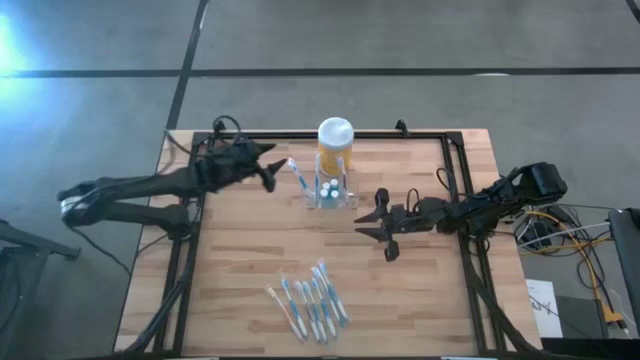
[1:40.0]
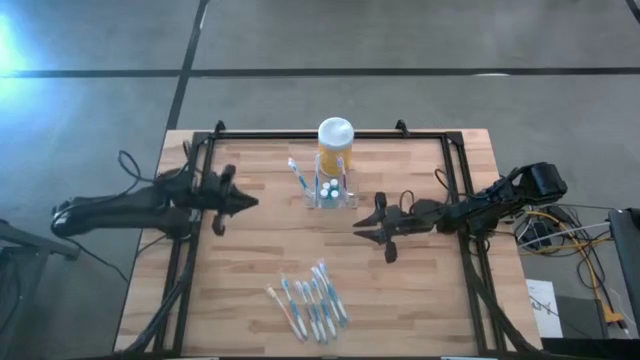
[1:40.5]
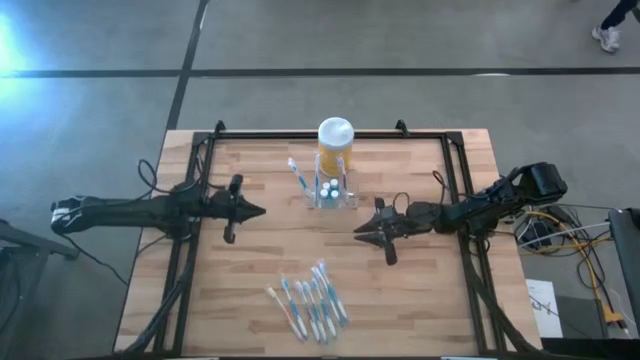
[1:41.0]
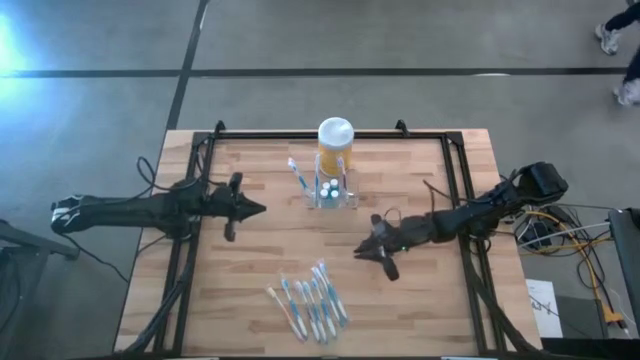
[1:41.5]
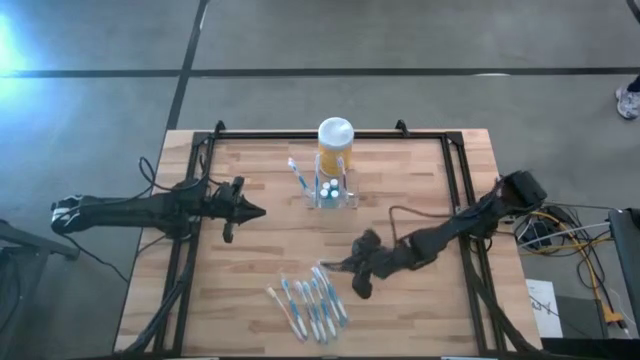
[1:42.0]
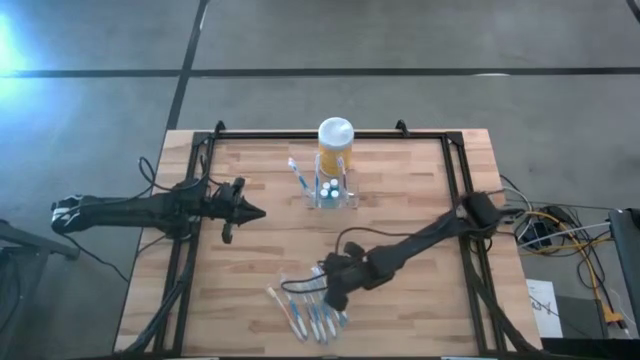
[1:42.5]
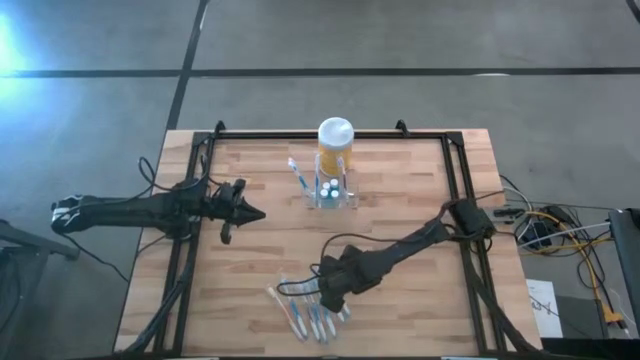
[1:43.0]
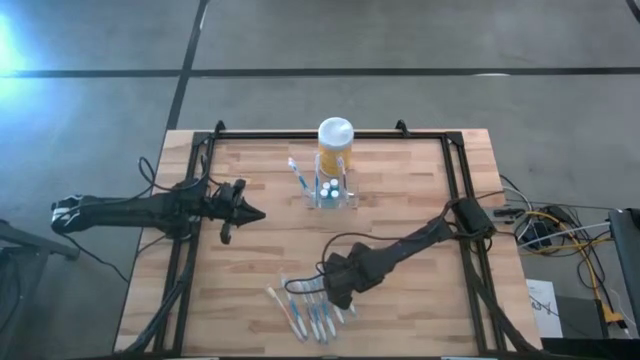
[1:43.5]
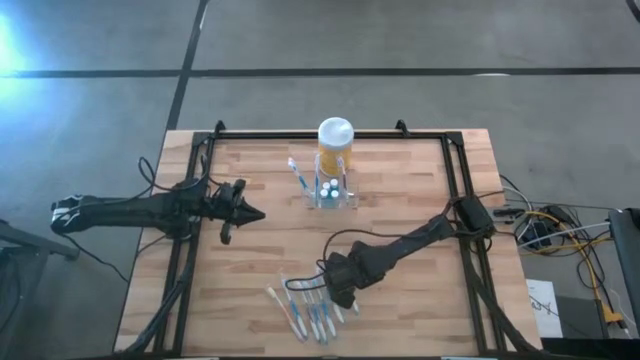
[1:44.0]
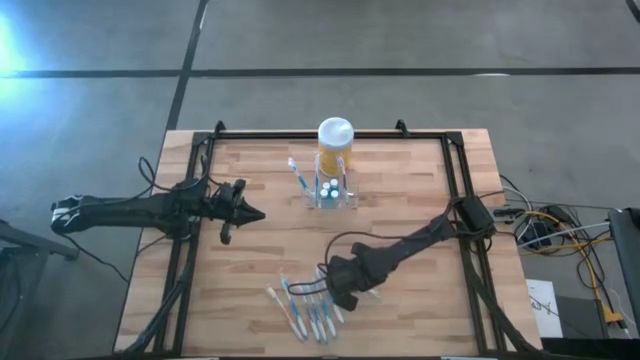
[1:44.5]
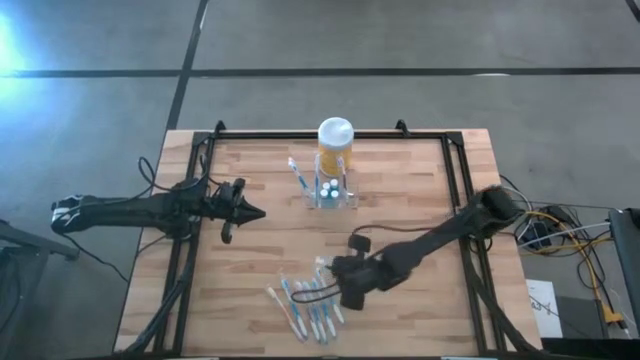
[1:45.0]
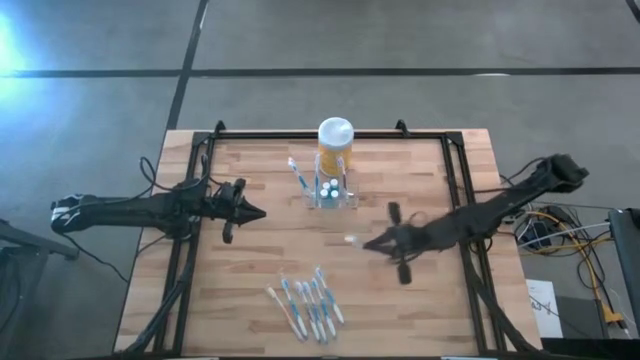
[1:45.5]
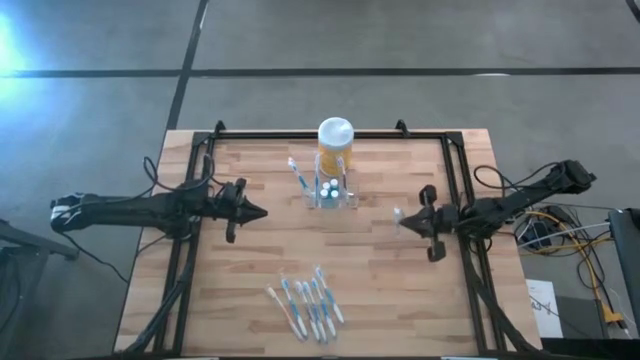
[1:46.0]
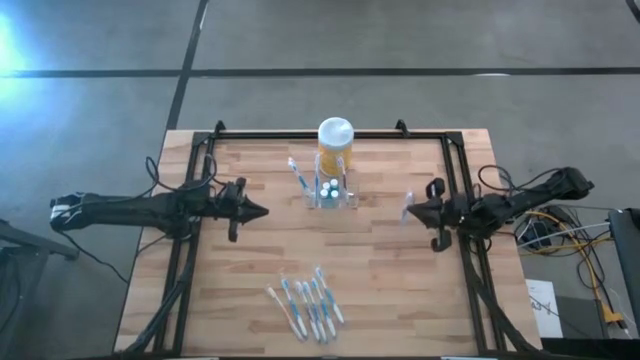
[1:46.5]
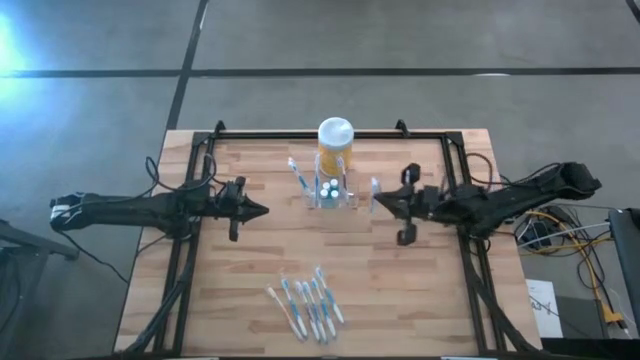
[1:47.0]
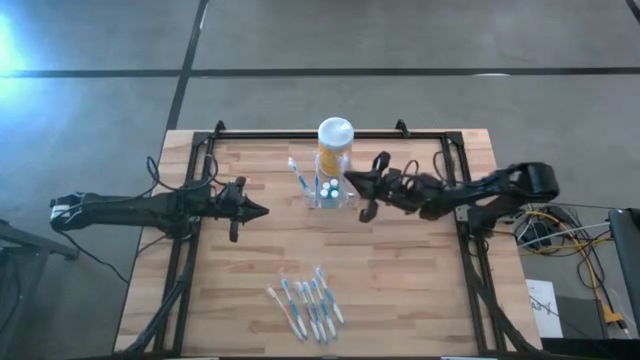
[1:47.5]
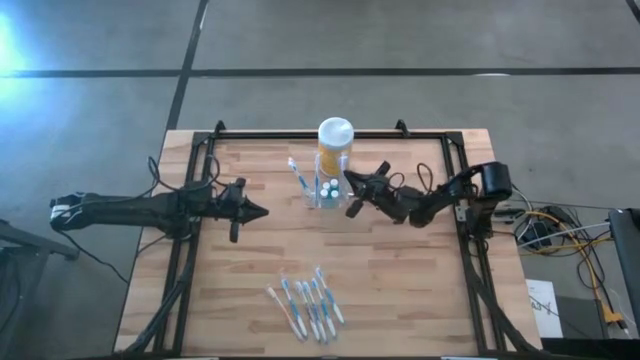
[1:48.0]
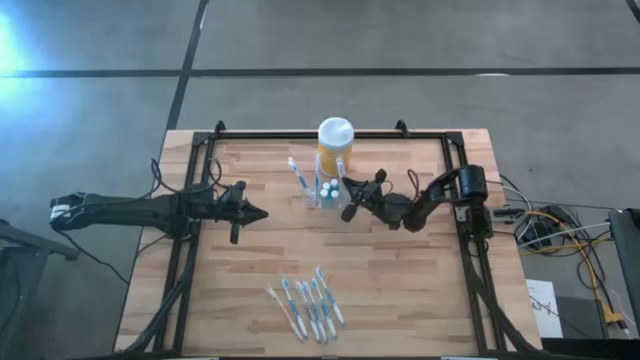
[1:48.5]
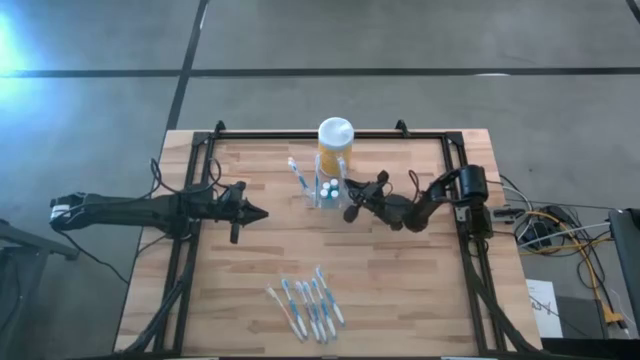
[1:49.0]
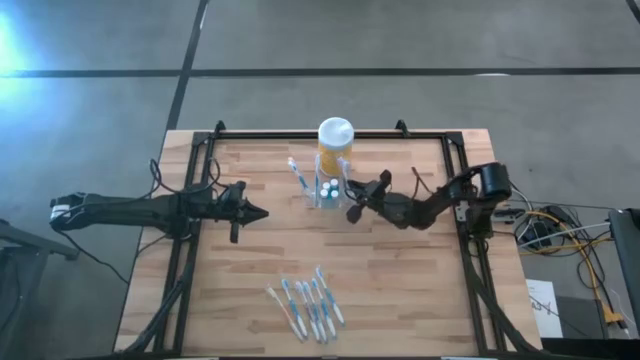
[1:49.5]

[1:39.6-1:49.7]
Task: Pick & Place toothbrushing station
Put the blue toothbrush into the transparent organizer

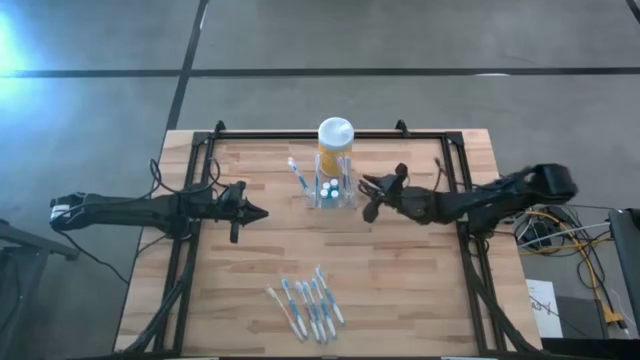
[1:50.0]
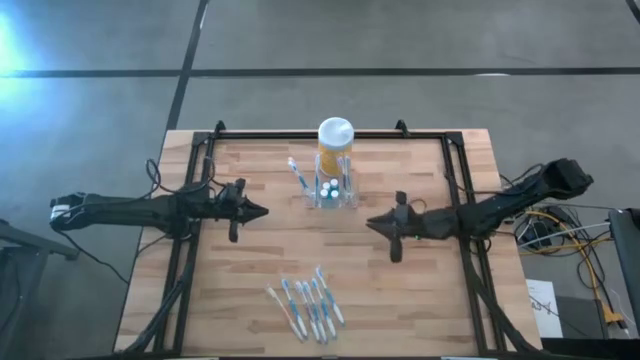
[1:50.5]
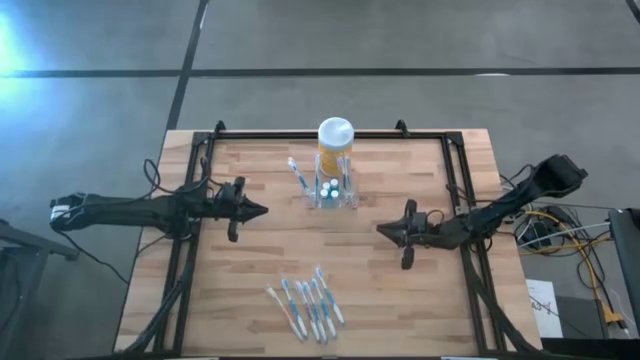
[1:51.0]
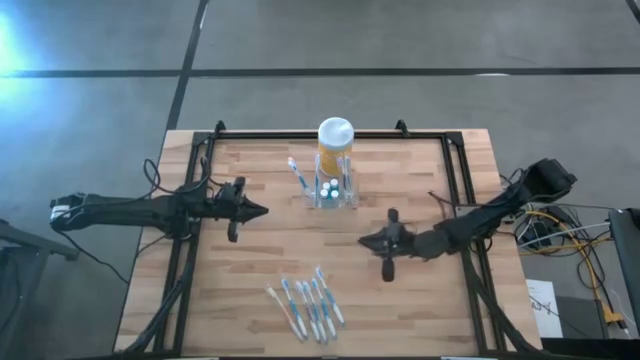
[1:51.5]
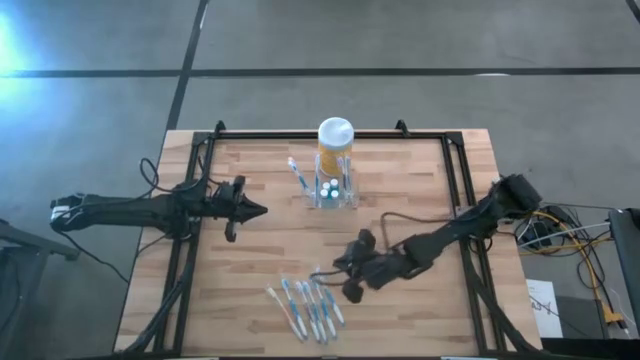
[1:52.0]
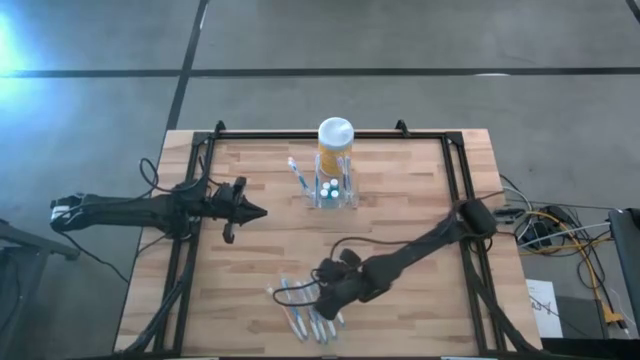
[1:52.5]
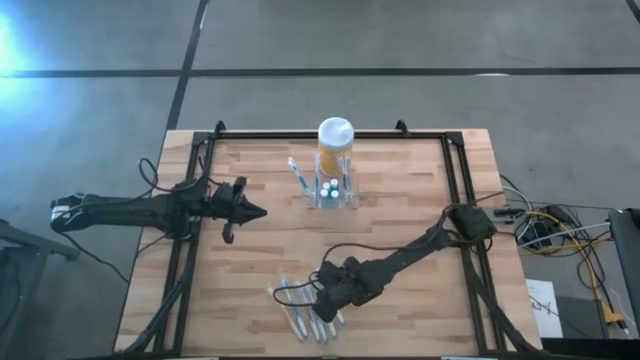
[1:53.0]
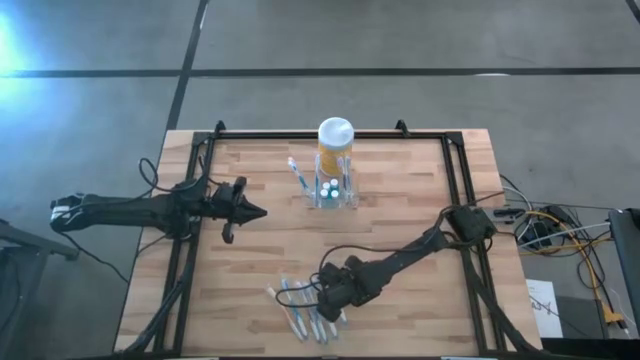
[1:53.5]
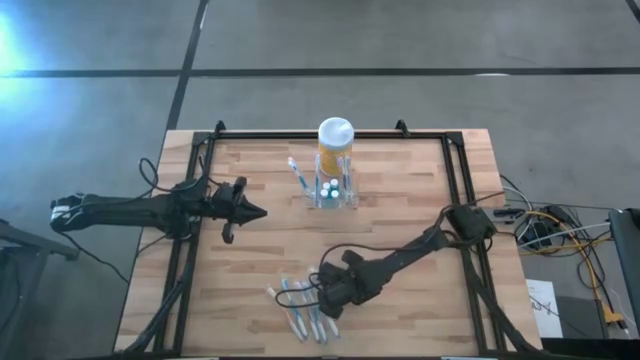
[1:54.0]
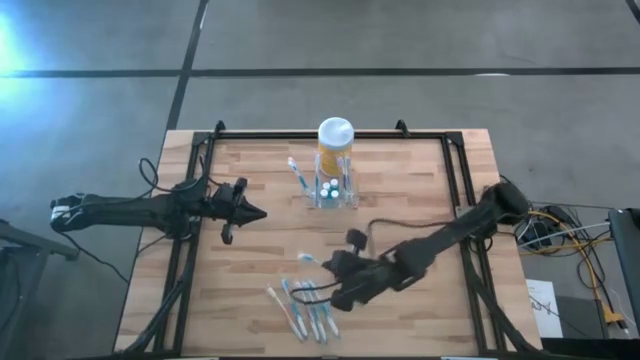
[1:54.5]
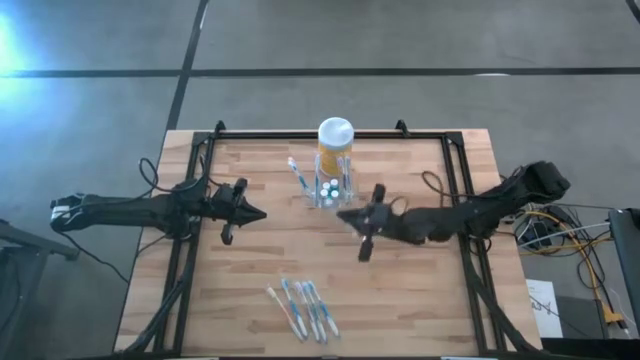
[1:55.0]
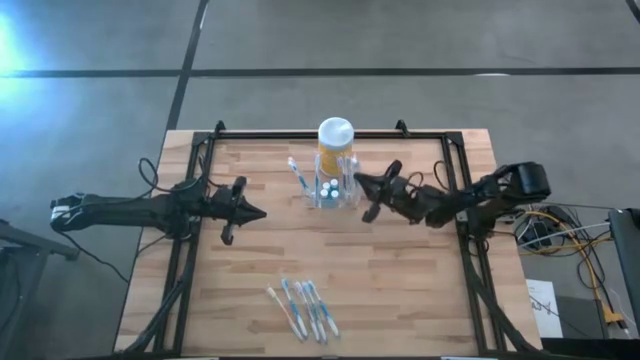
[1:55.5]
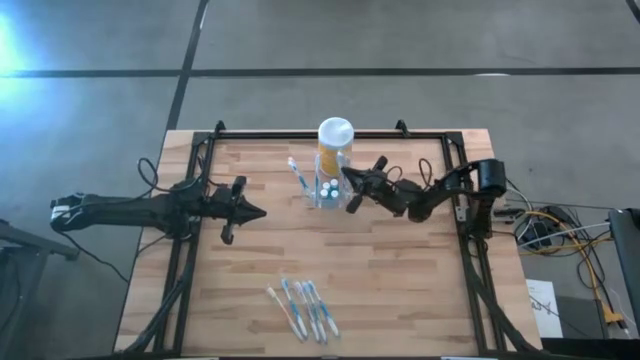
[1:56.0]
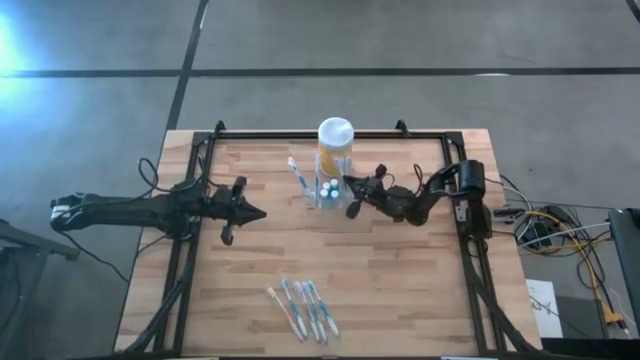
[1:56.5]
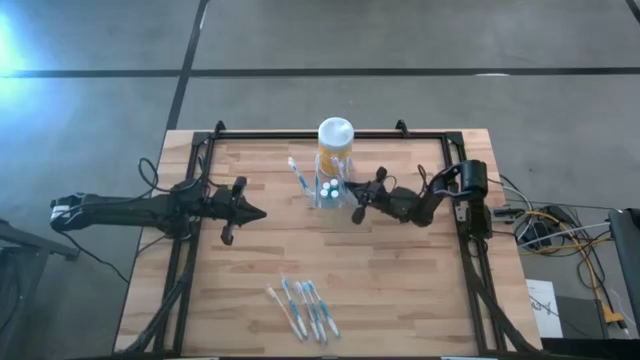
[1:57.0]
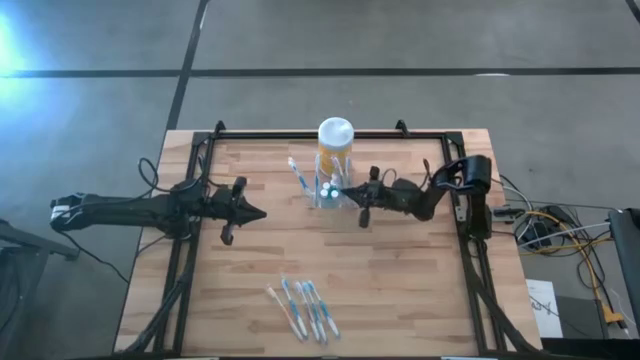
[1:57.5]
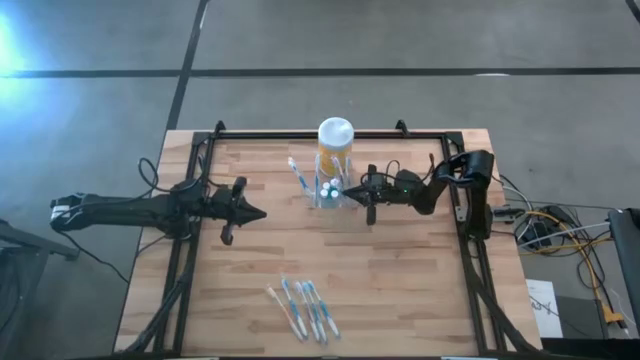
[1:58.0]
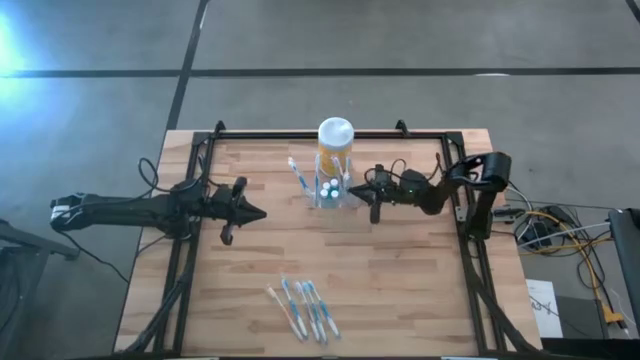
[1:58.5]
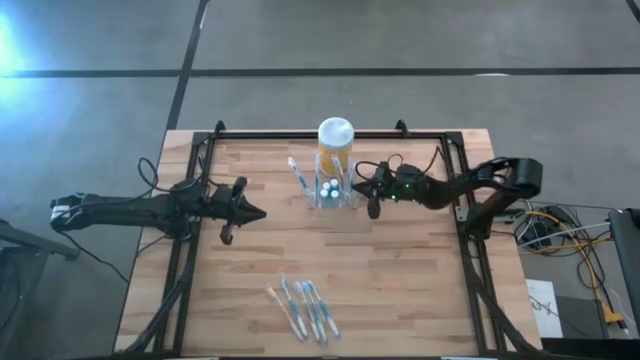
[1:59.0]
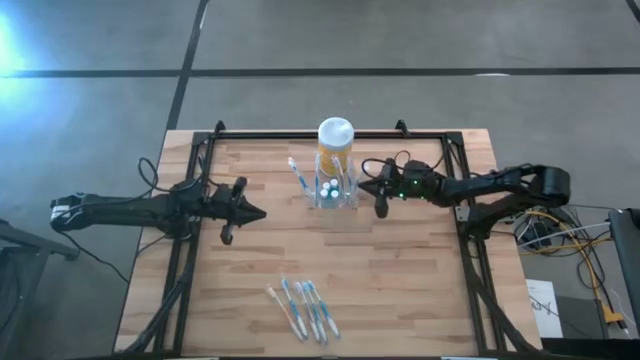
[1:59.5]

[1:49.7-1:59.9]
Put the blue toothbrush into the transparent organizer

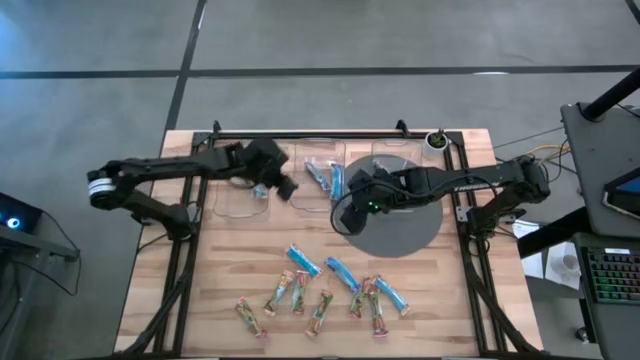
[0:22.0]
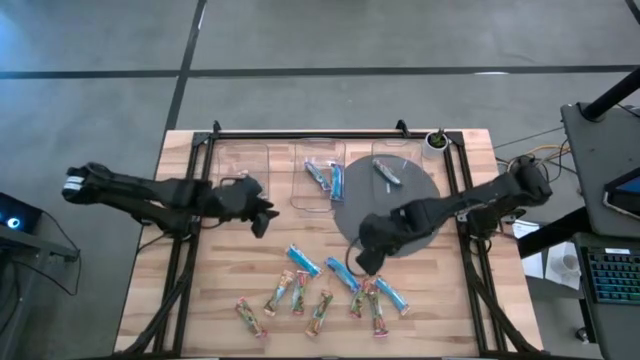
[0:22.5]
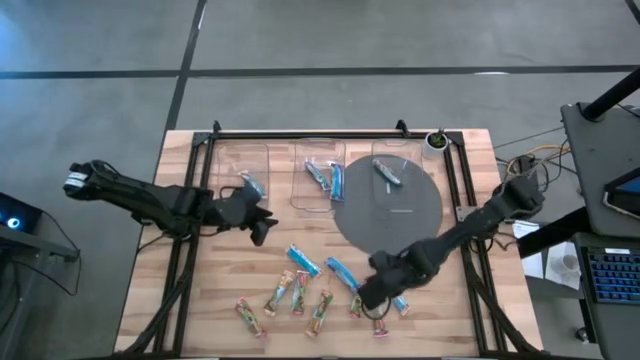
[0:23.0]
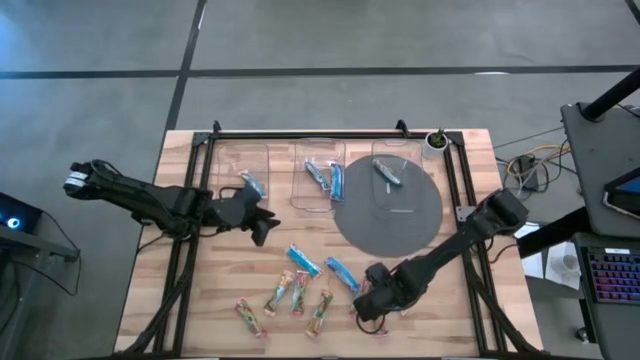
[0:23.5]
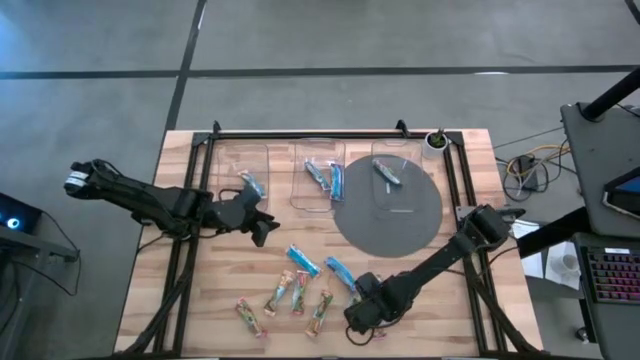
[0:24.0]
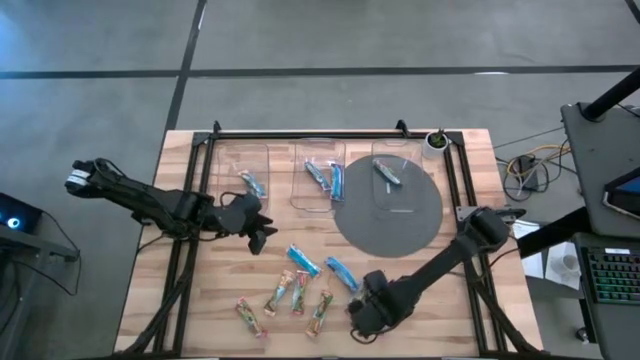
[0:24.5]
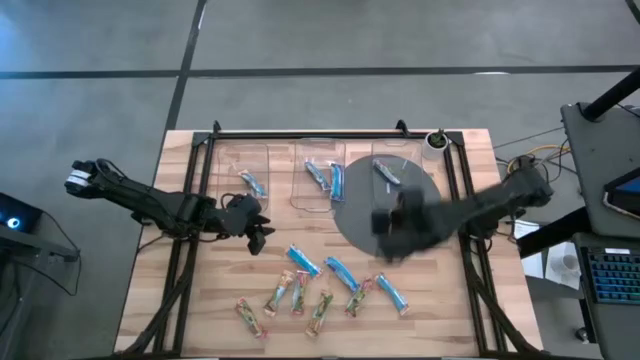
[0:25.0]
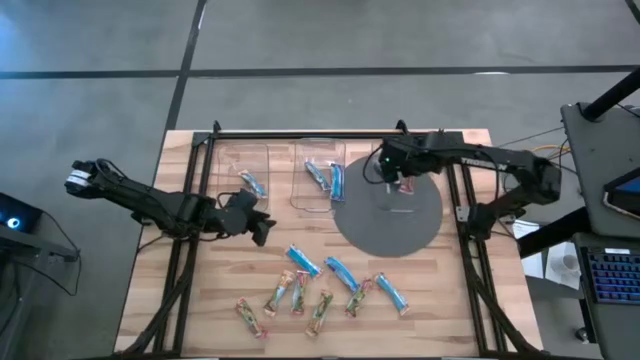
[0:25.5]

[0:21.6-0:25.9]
Task: Pick and place Granola Bars by type
Put the red granola bar into the right transparent container
